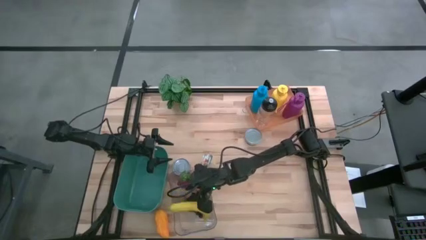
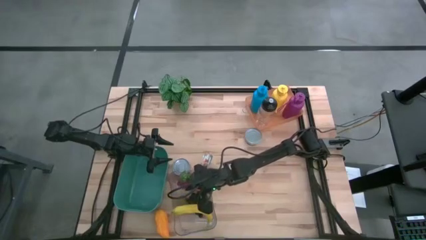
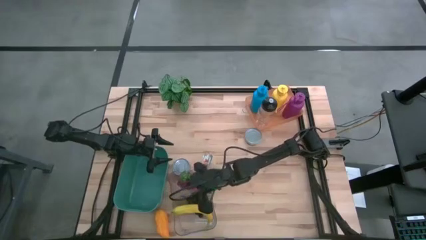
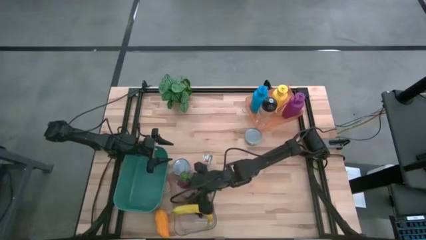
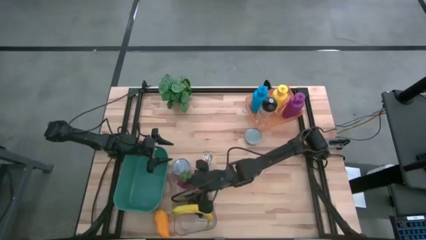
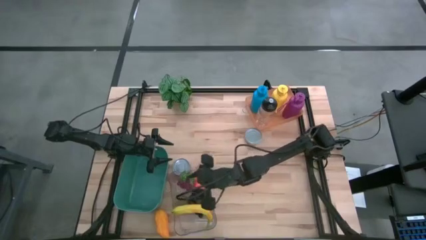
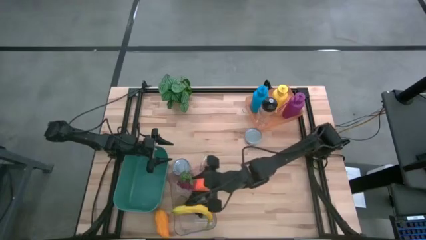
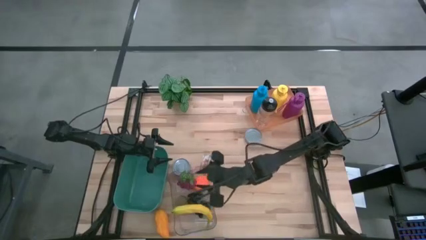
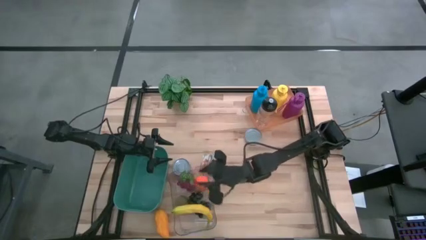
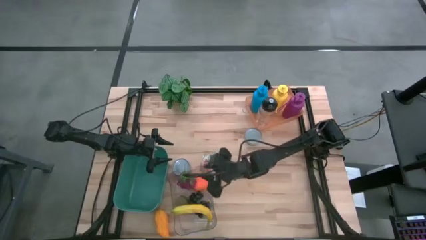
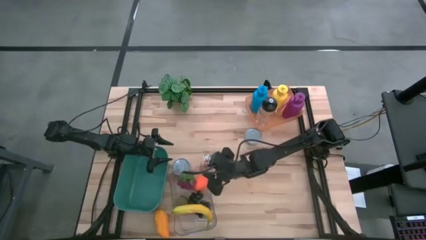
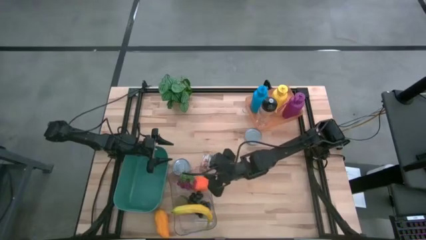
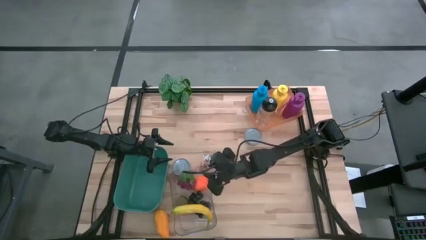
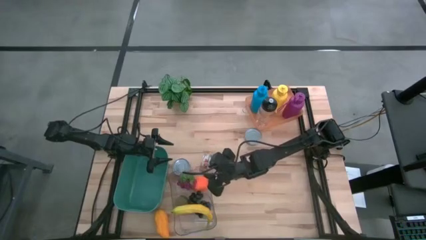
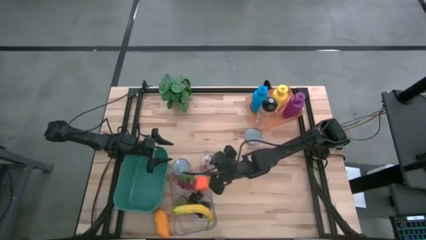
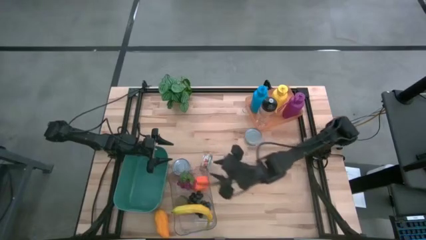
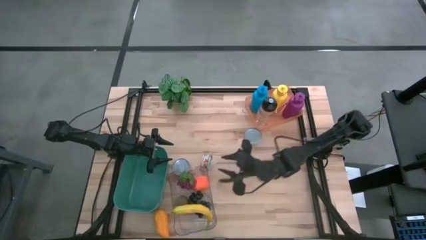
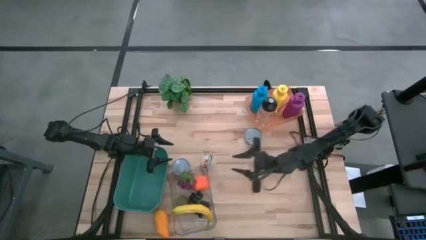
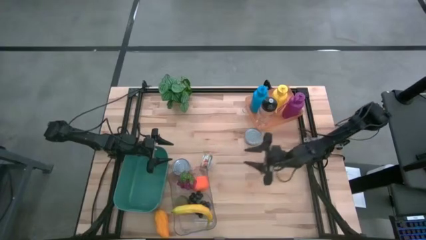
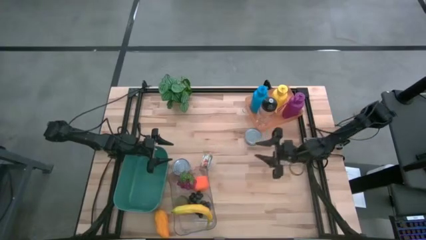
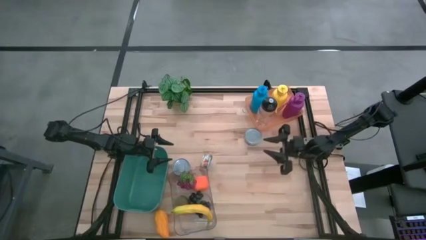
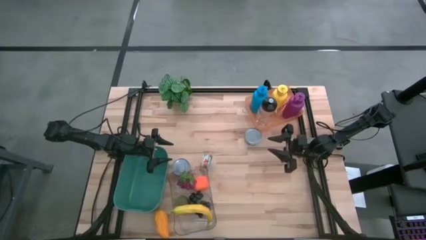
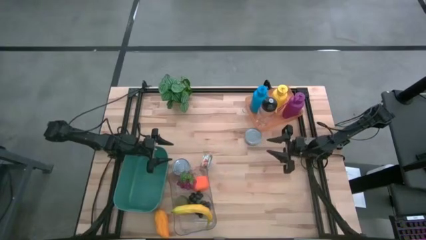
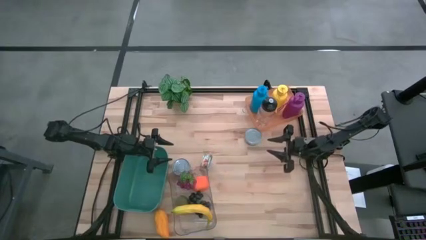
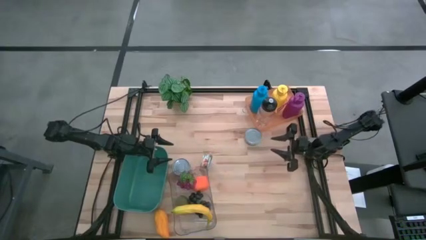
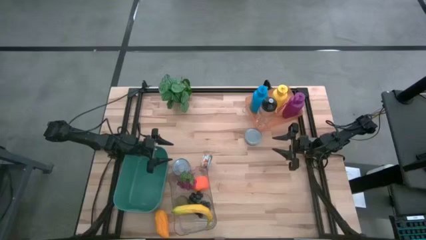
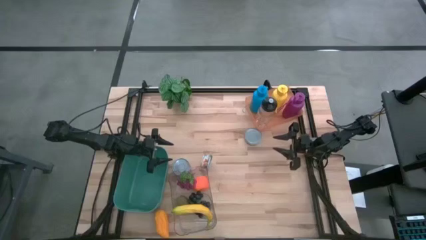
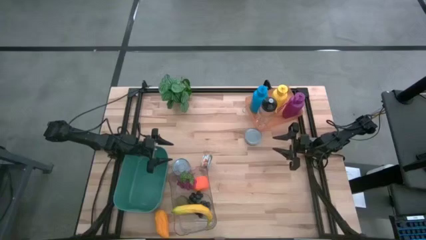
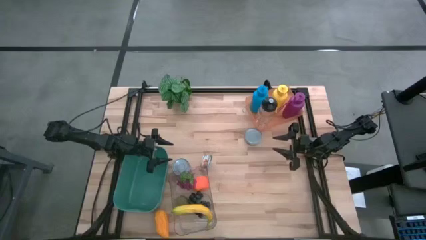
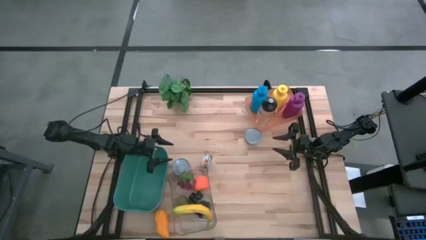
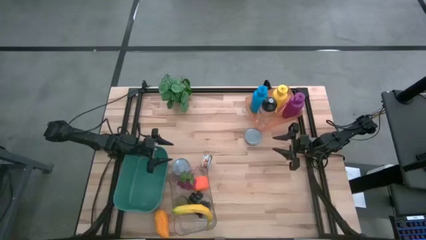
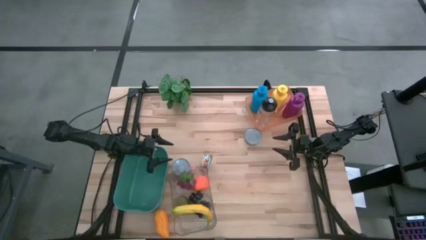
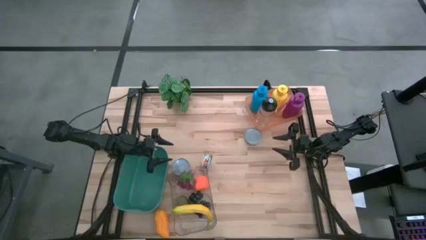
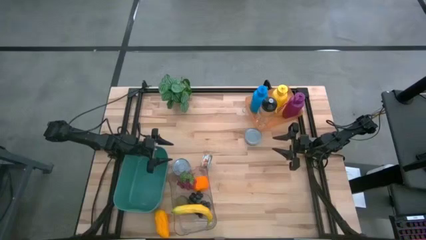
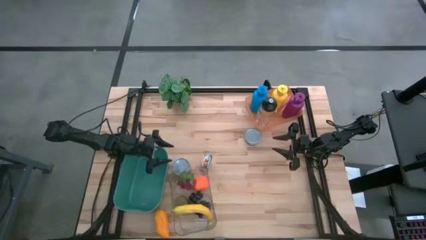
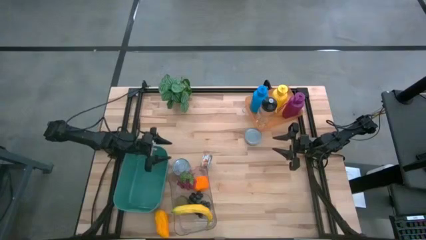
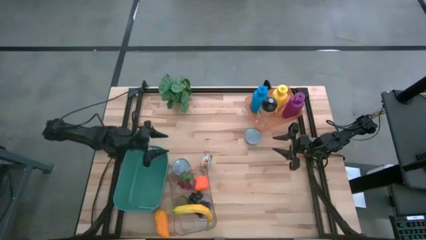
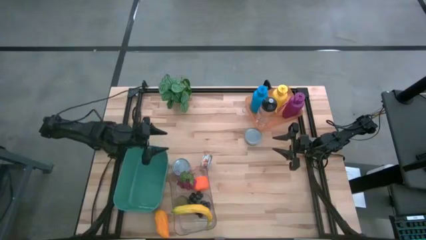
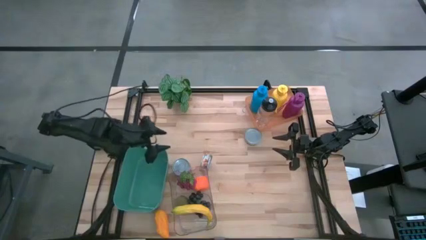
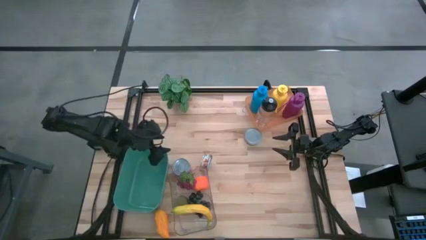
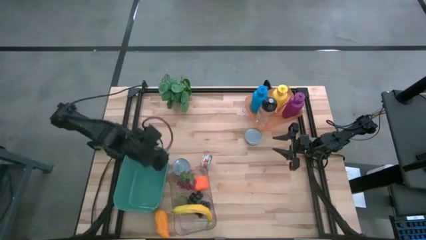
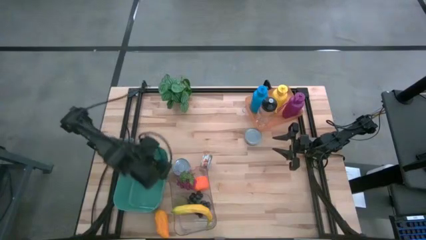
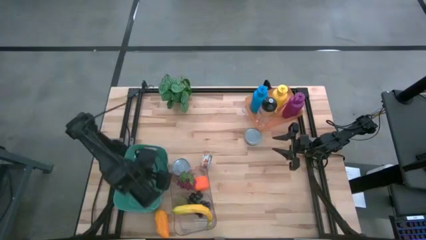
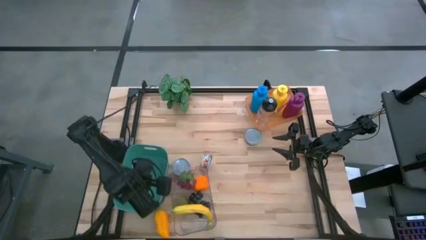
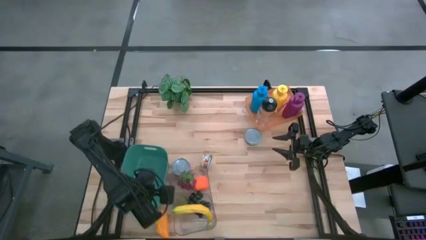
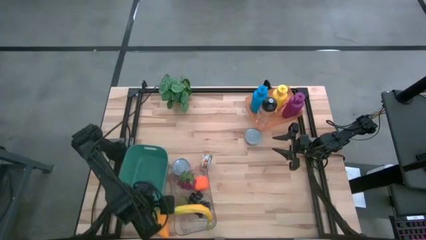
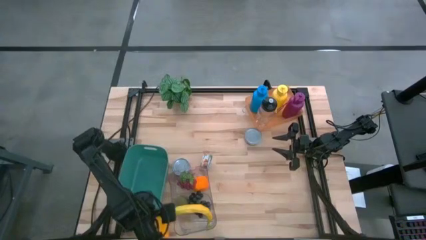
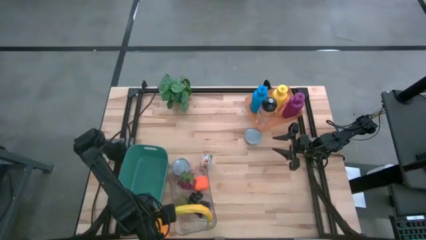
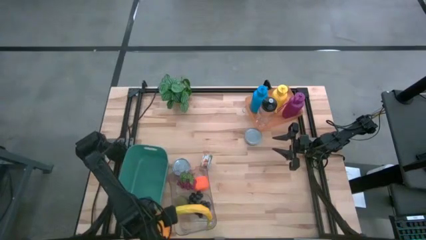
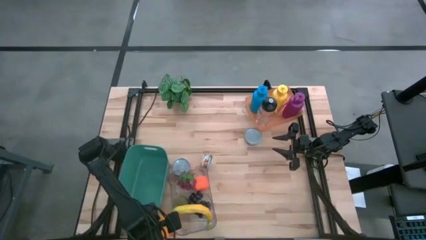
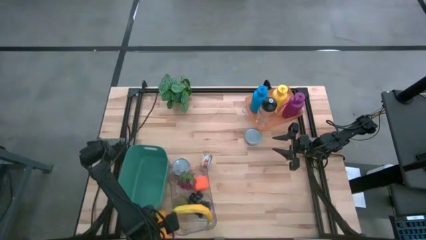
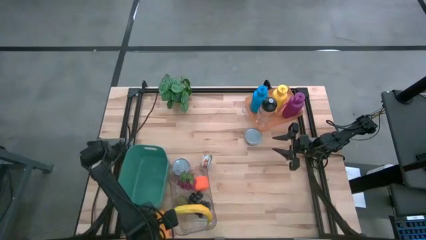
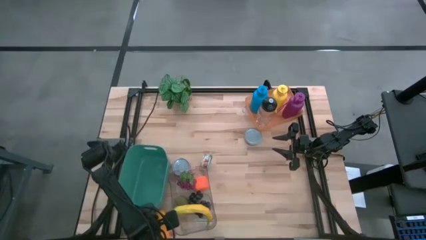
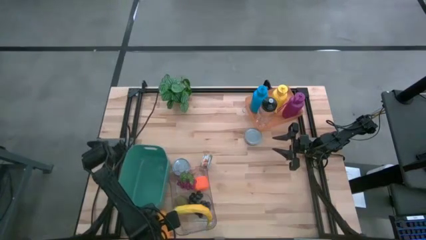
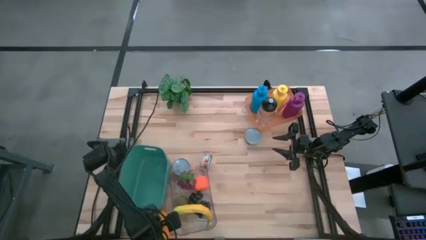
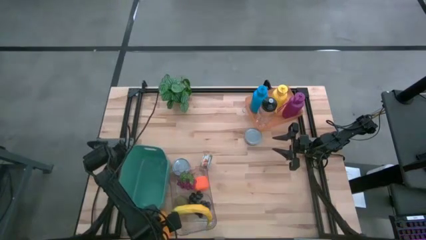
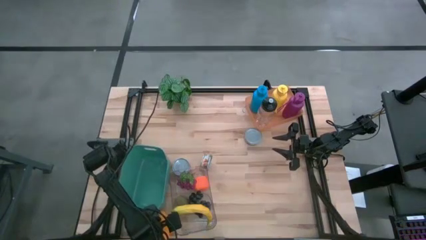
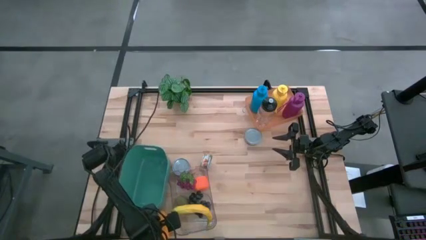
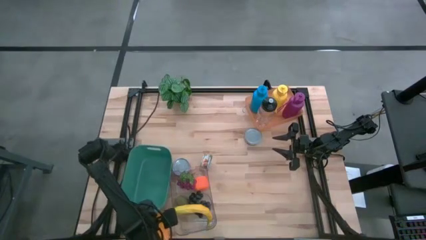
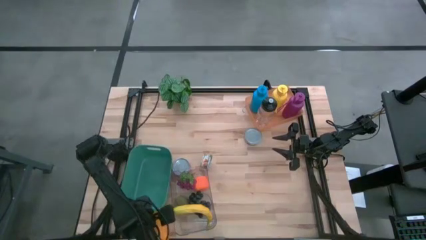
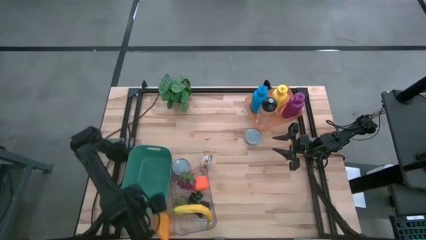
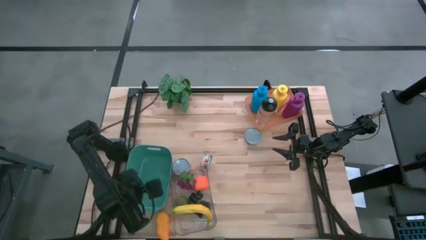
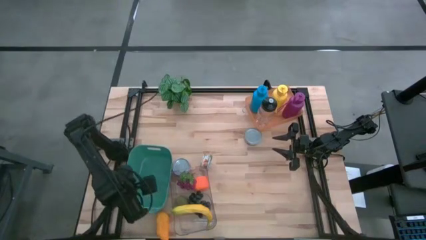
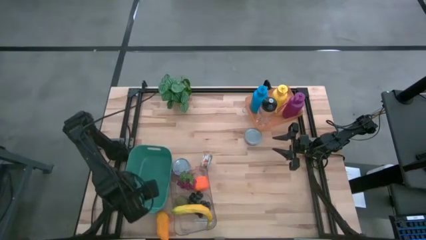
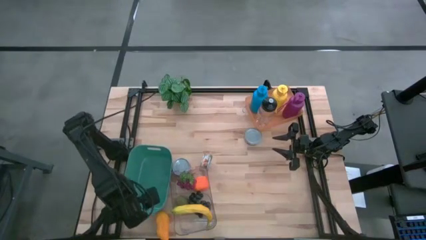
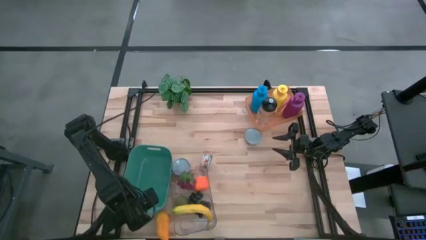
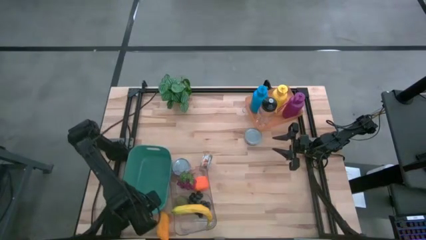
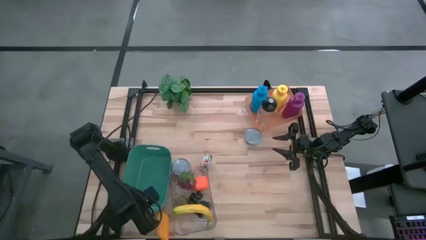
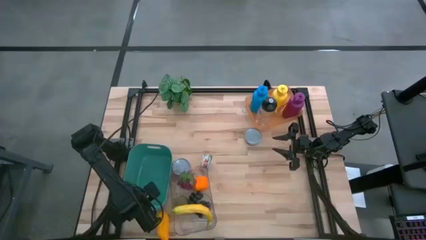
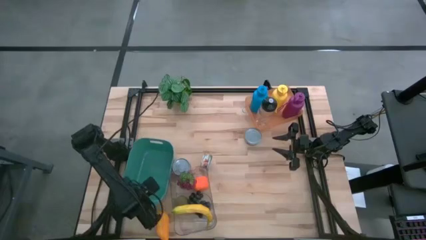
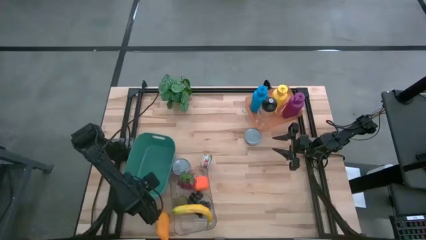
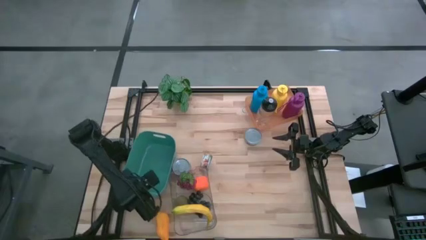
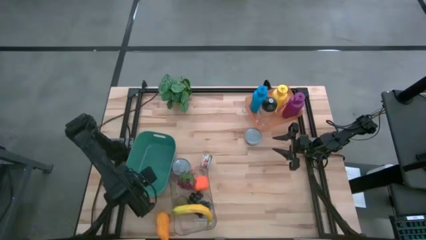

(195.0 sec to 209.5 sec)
Task: Pick & Place Food Item
Adjust the blue bin

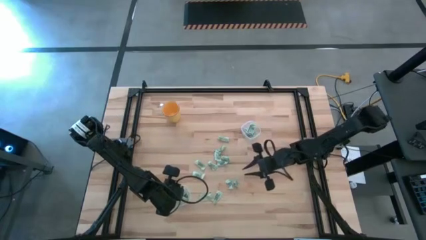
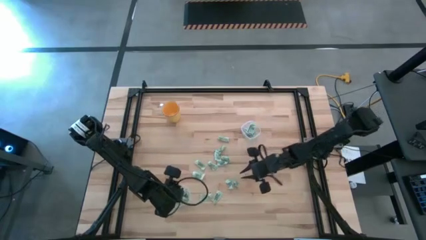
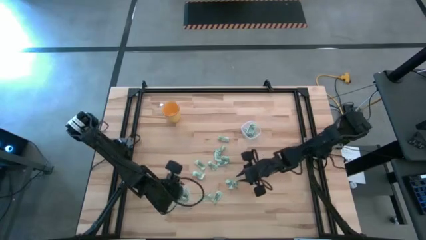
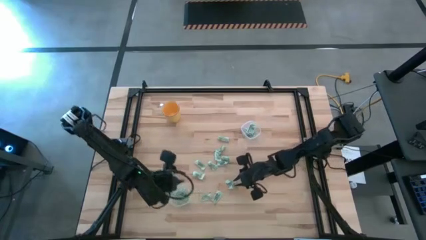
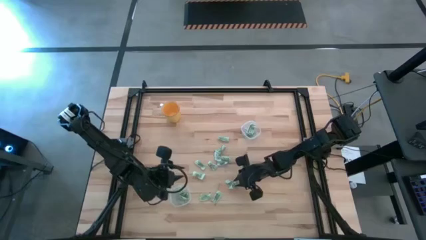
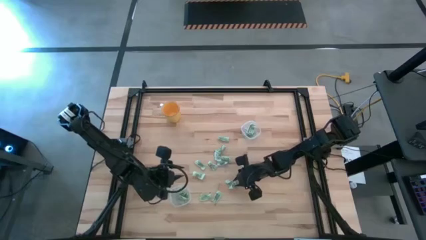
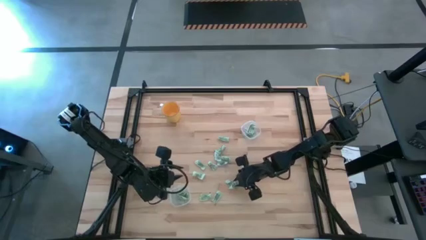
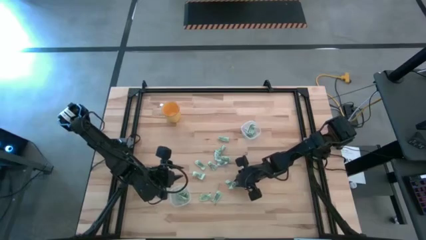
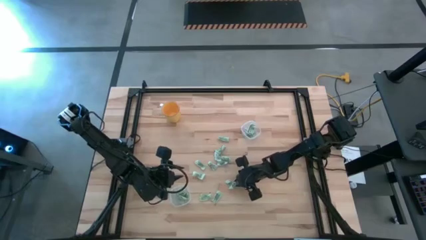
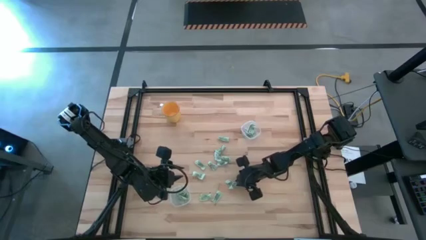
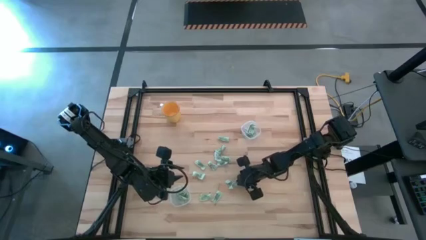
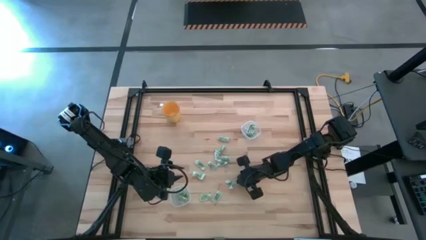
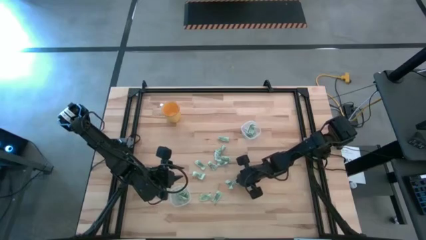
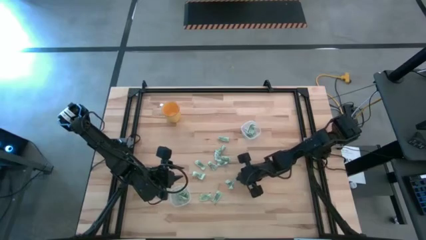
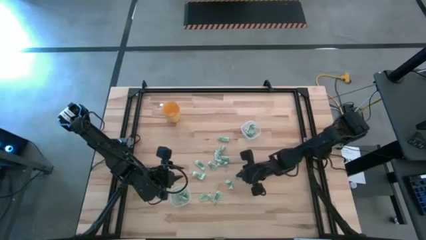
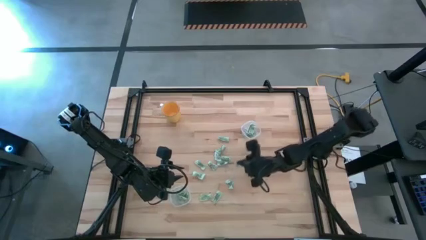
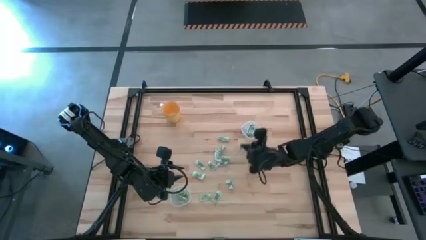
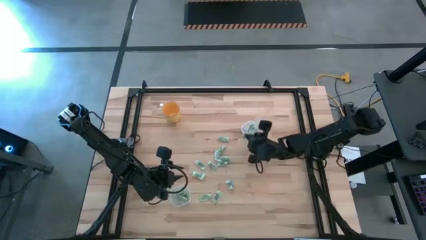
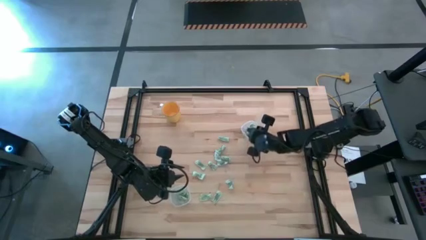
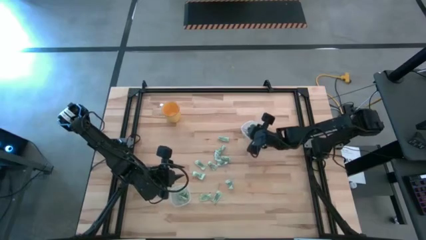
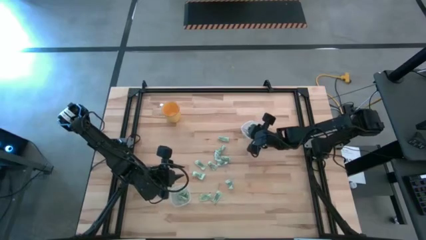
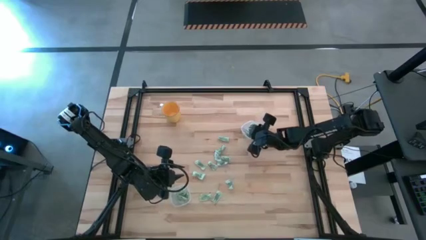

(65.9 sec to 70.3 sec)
Task: Pick and place Stevia / Truvia into bins
Put the green stevia packet into the top transparent container
